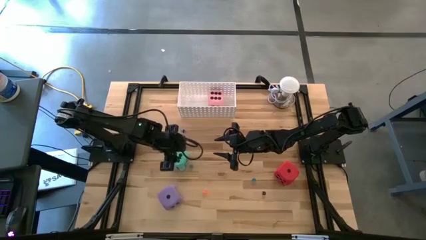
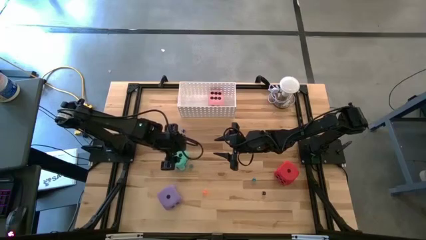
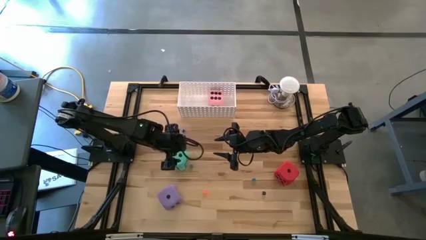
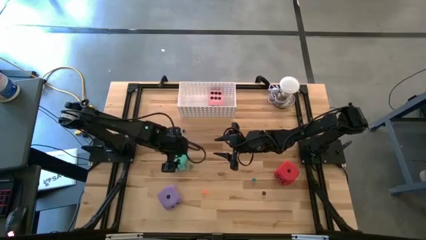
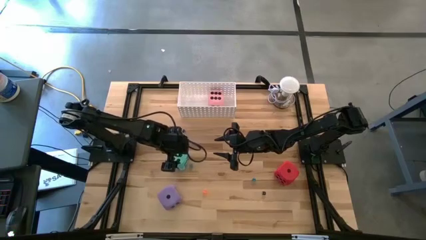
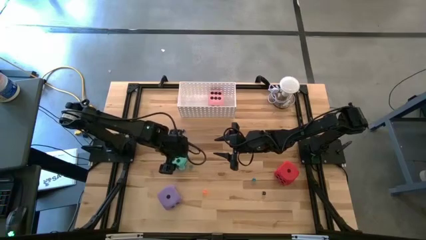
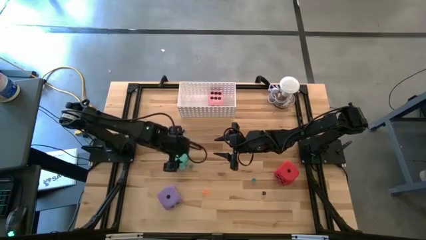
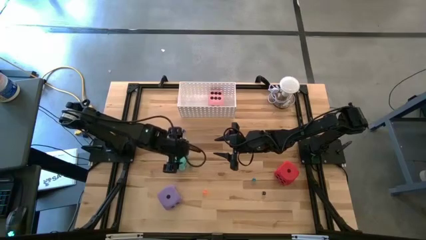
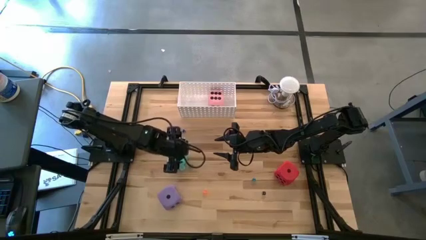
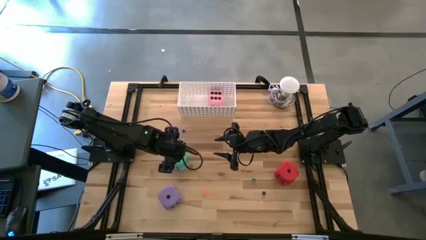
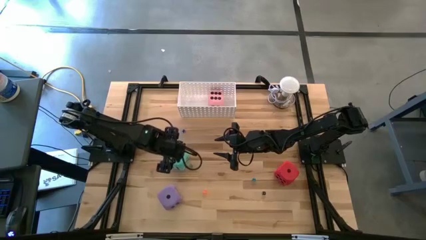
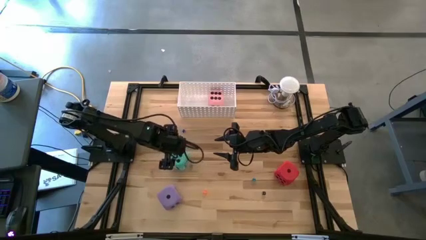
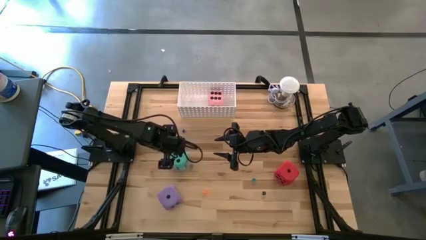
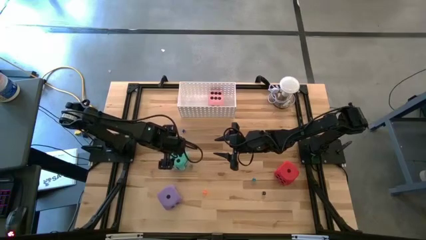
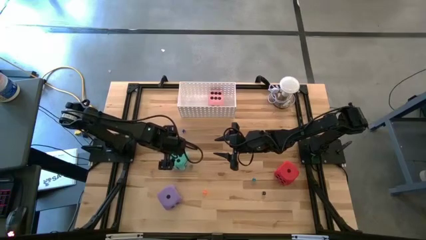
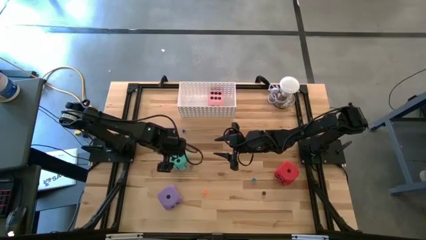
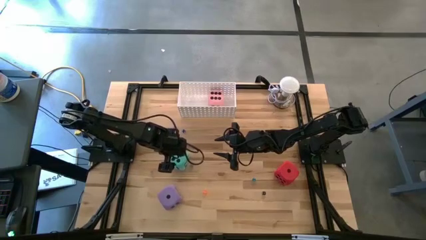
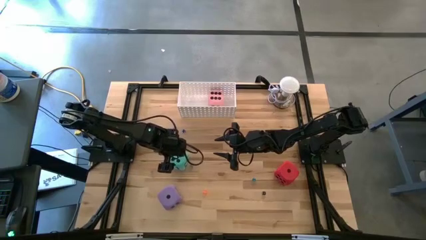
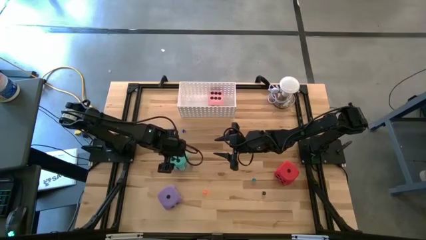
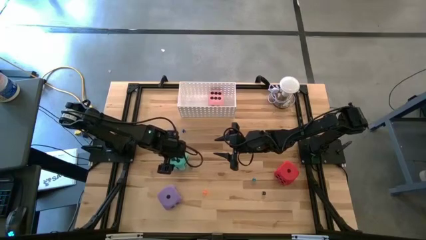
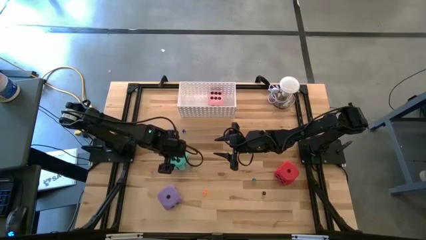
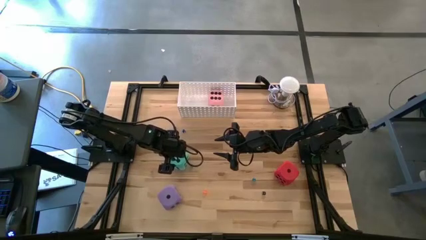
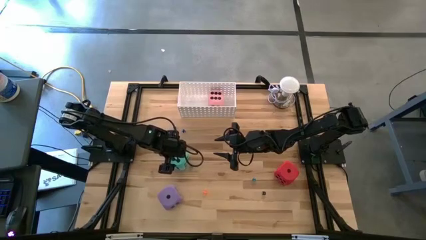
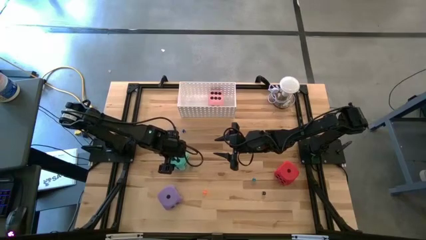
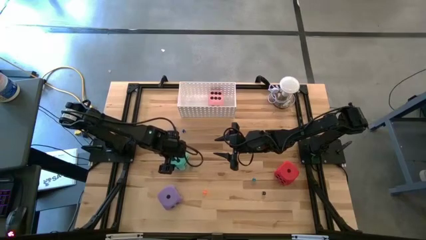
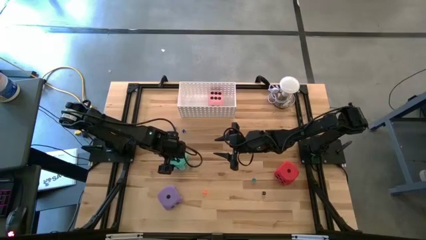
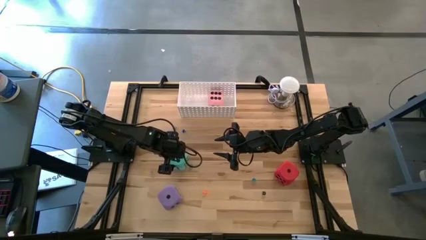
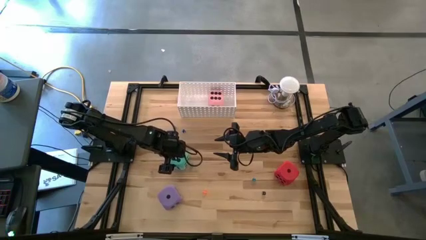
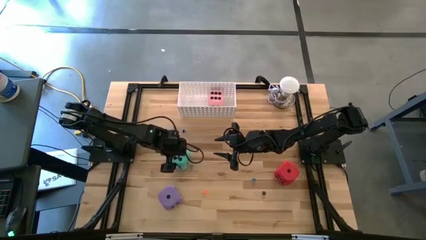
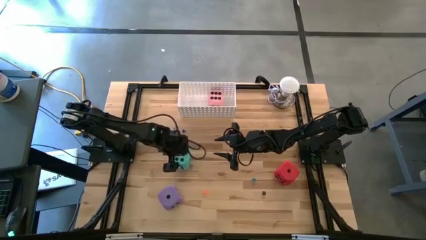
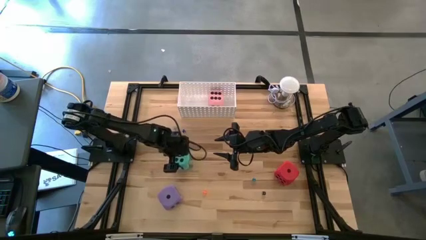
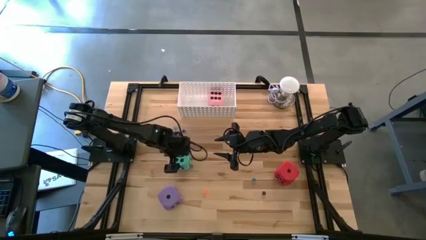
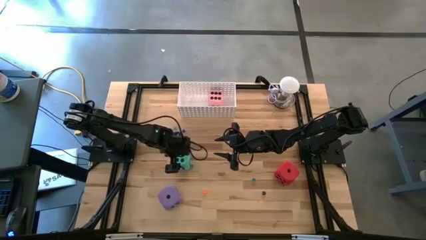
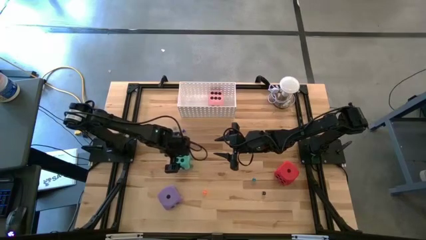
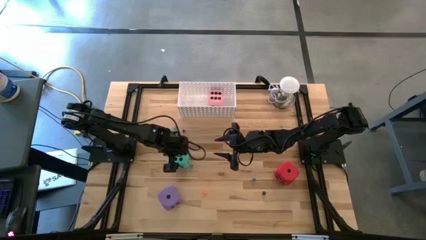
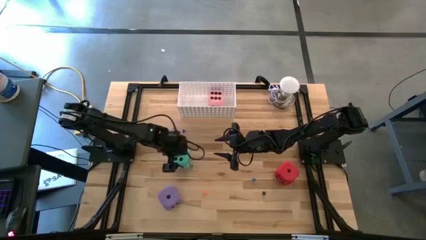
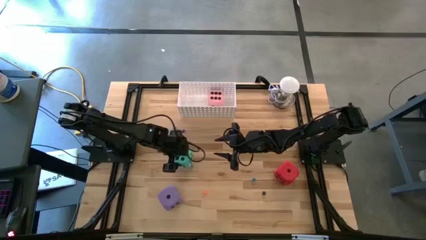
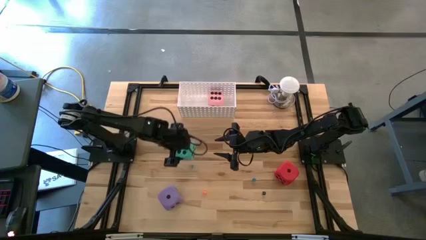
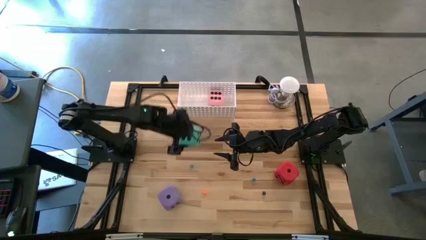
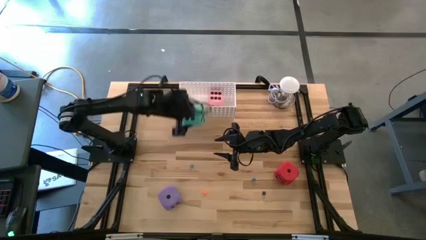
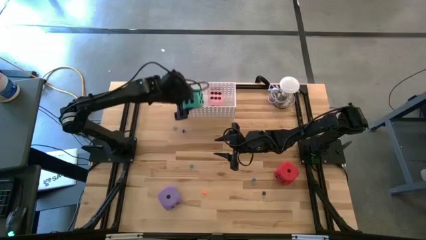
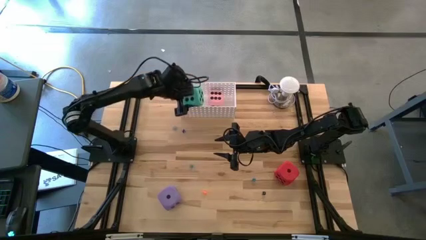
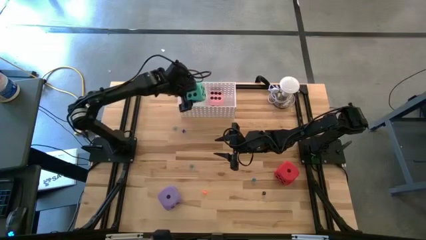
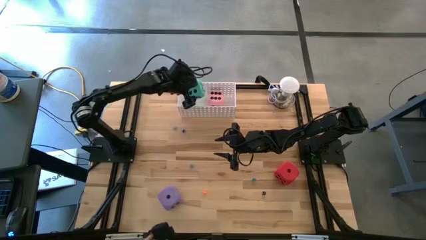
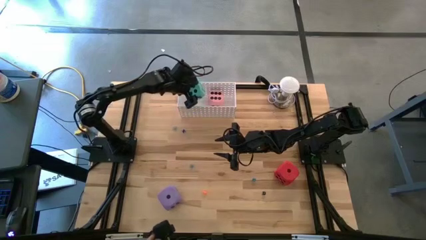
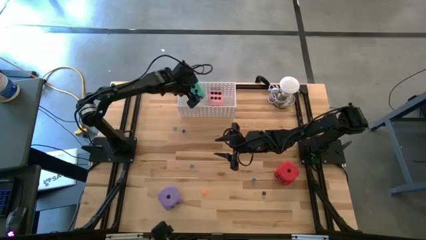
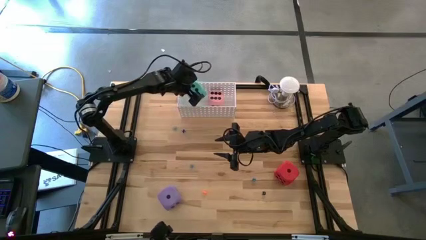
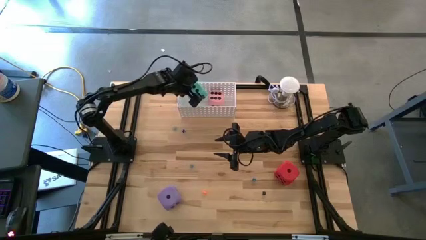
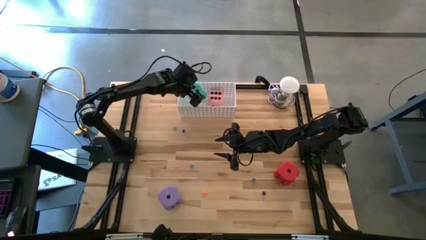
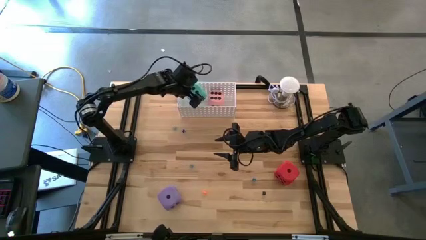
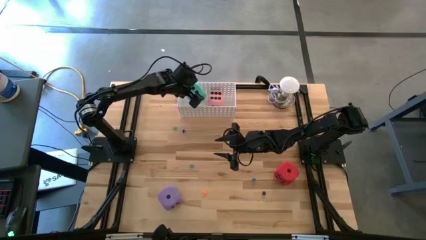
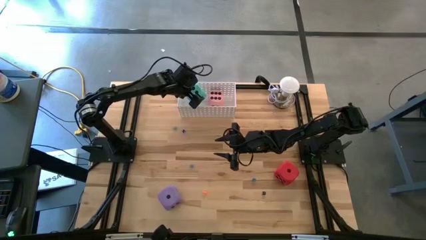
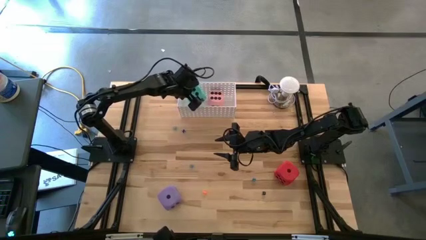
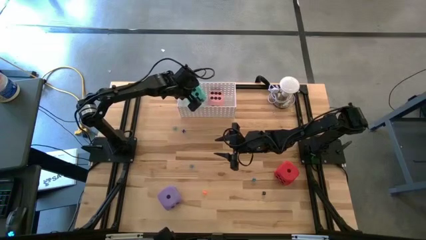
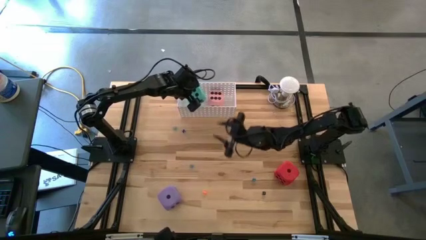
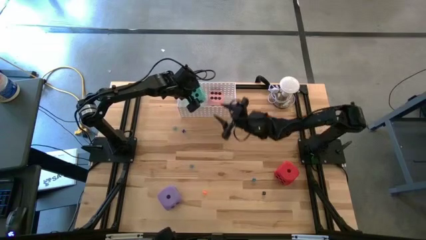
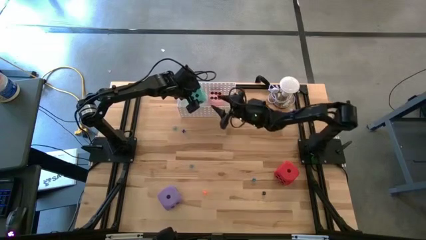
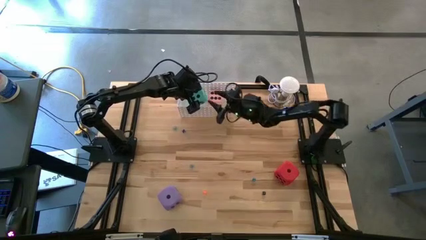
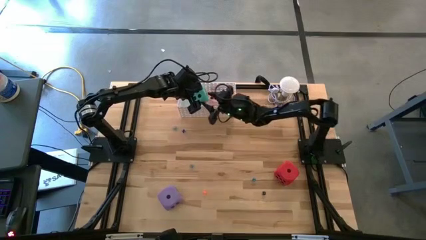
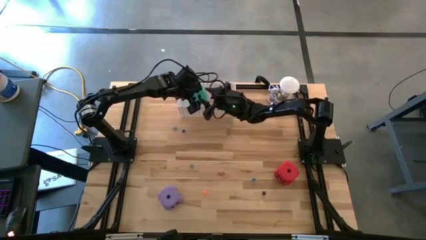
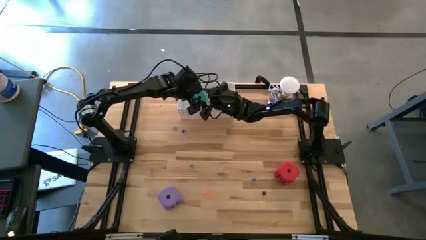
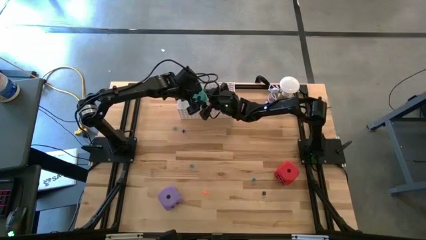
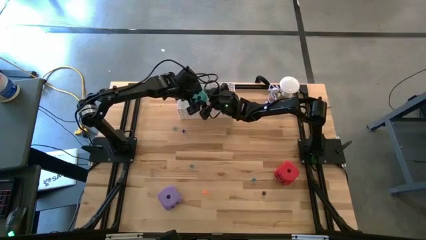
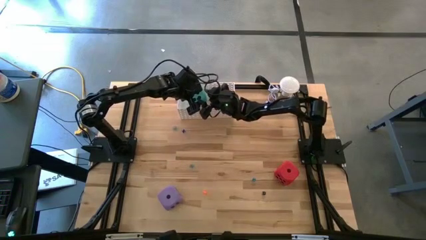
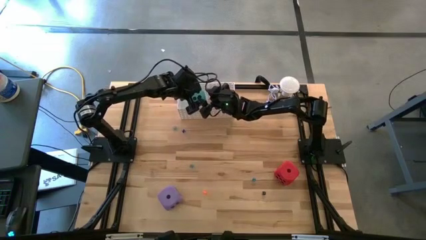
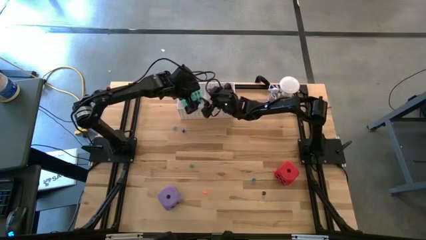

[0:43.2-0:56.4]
Task: Pick & Place Dice
Put the large light green dice into the white basket
